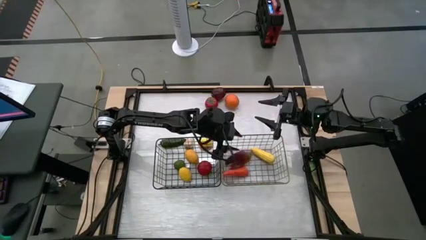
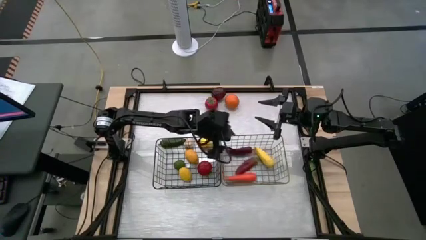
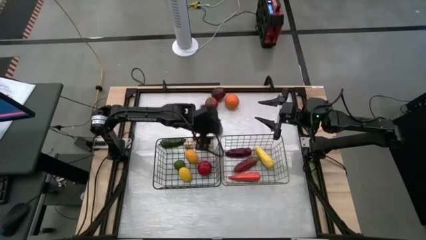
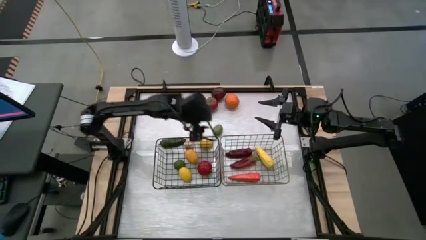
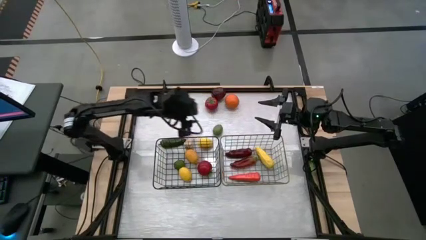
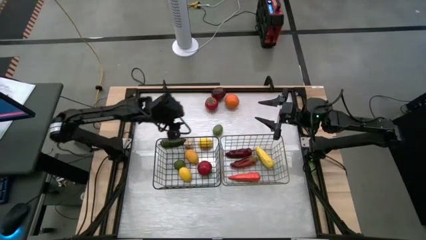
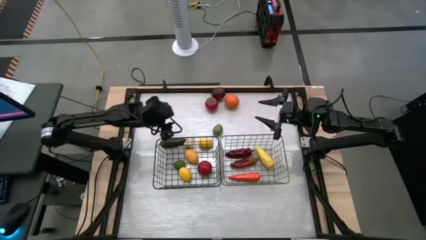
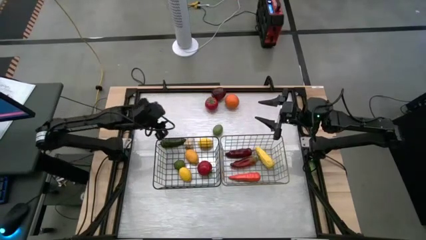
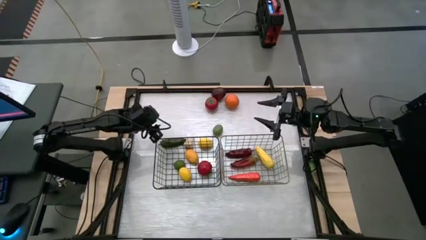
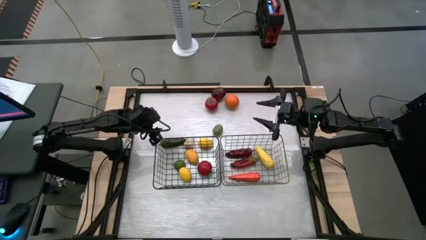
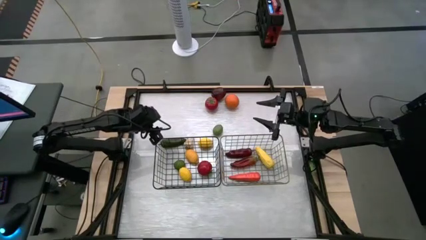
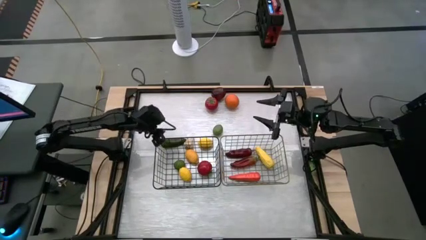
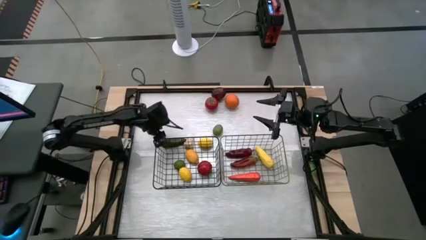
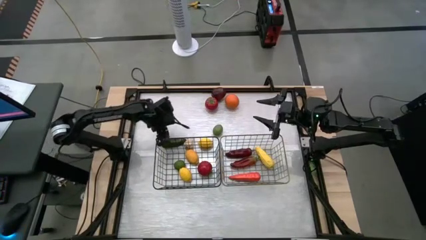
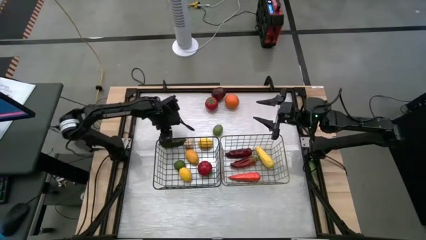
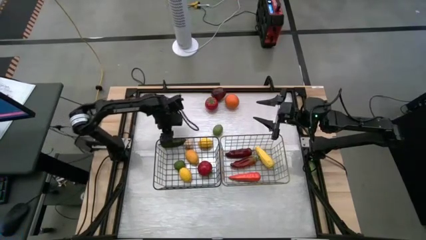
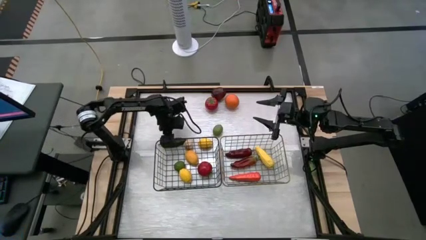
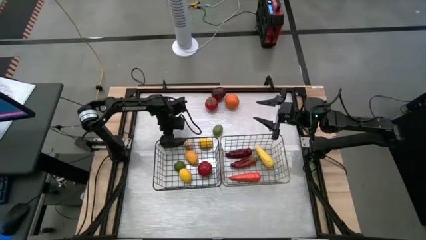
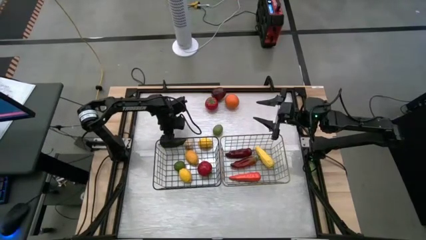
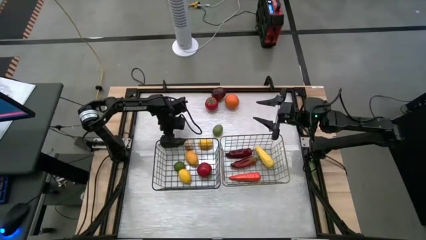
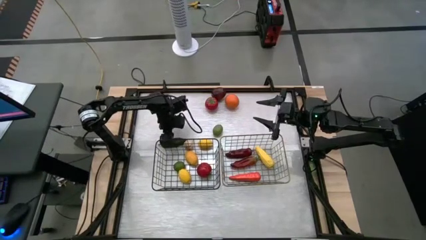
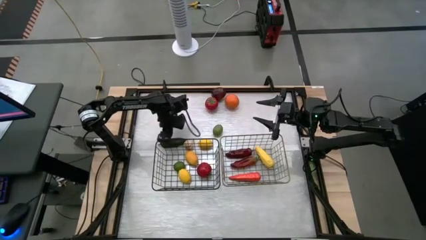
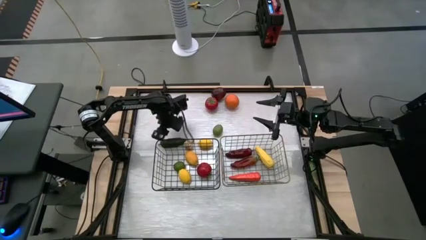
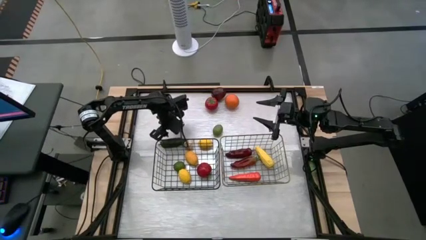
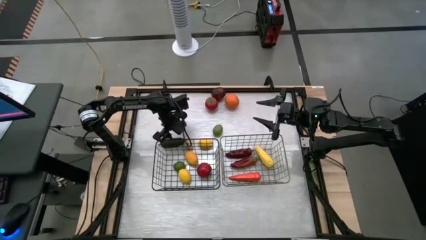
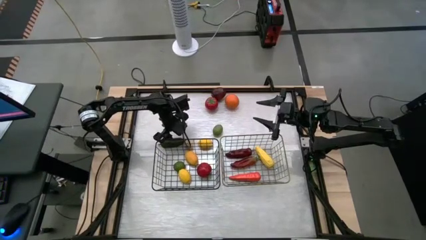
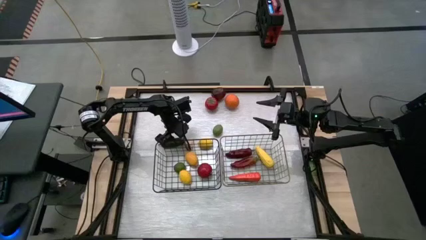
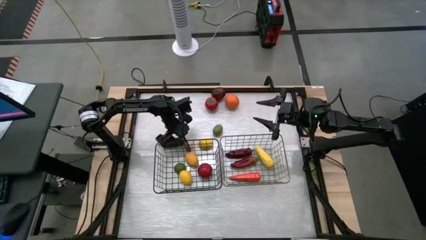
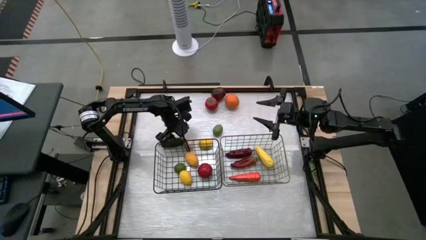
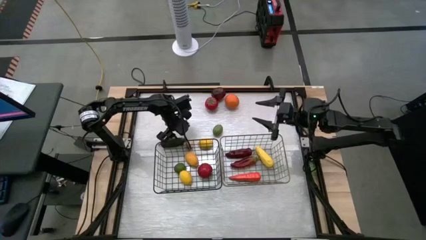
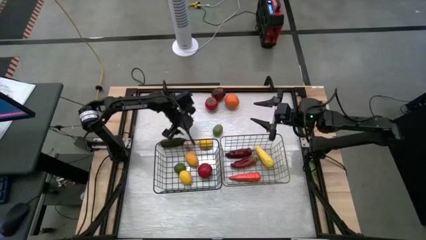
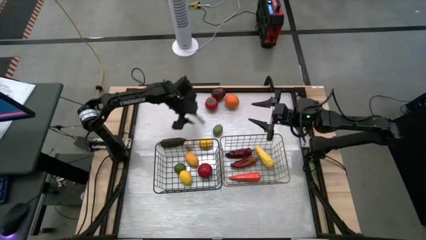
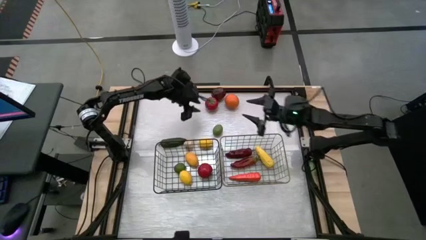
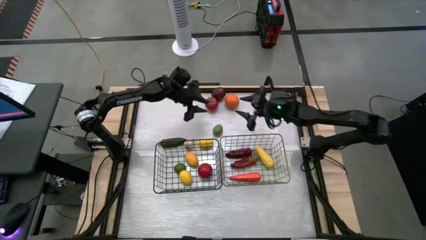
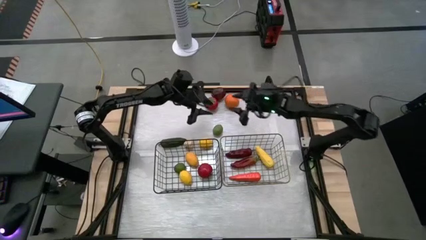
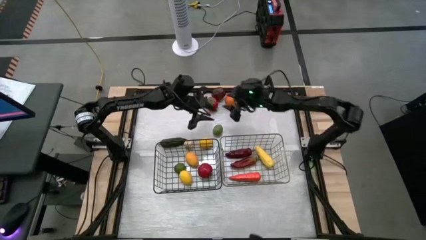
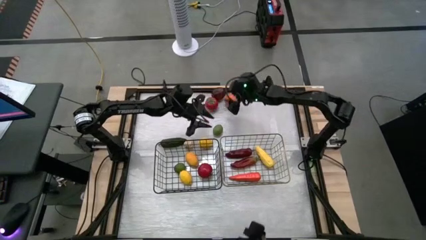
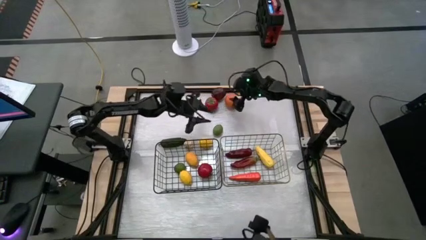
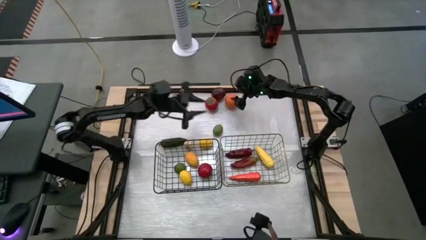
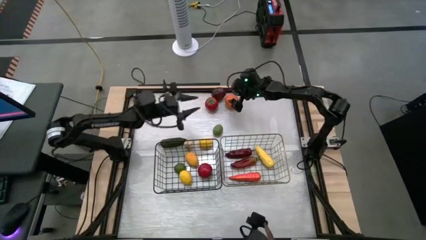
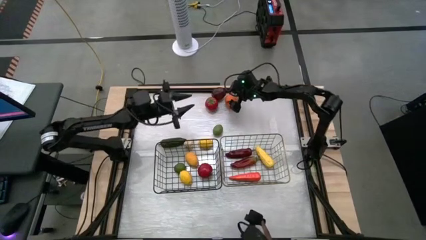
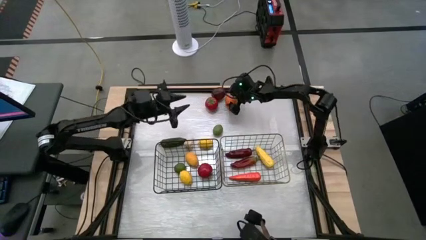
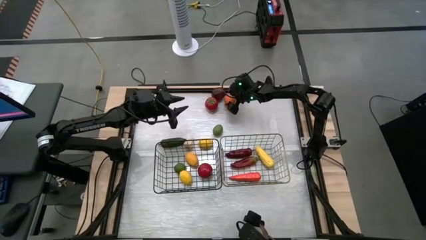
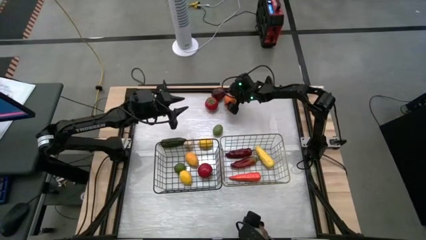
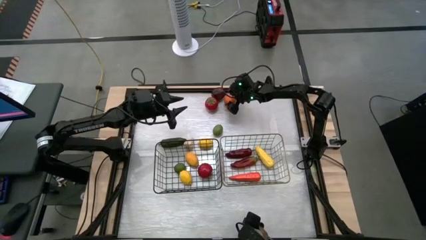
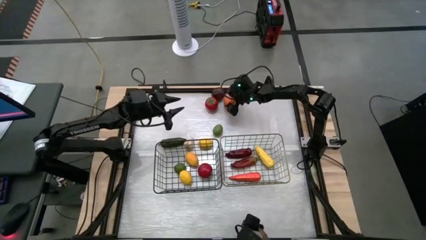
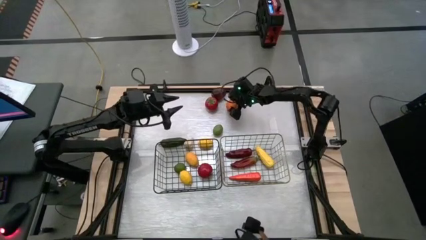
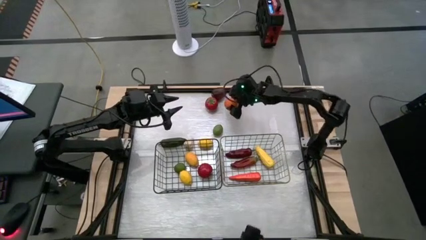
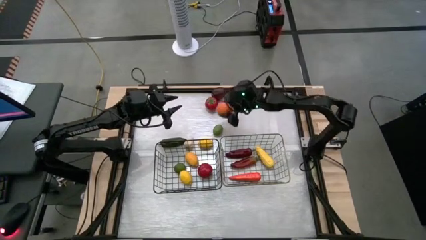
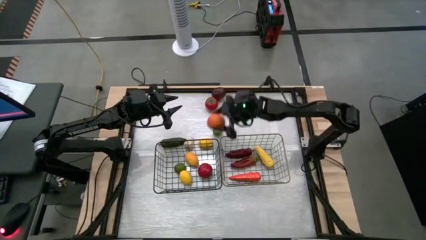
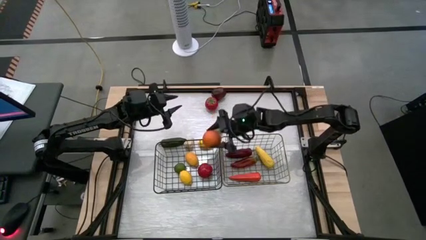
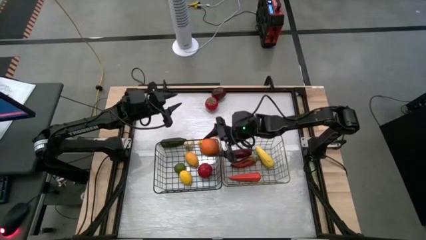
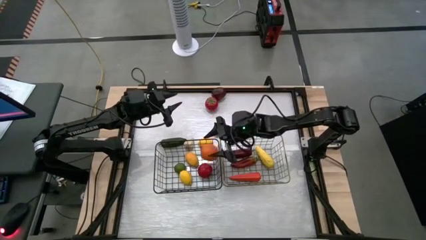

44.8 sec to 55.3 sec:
Task: Sort produce into baskets
Put the orange into the black wire basket

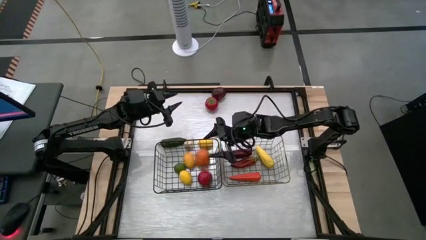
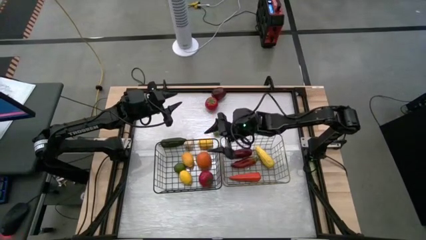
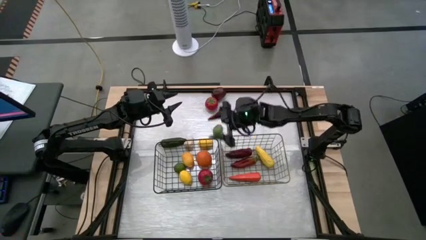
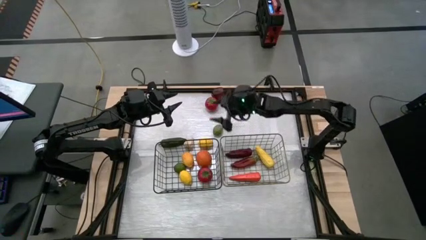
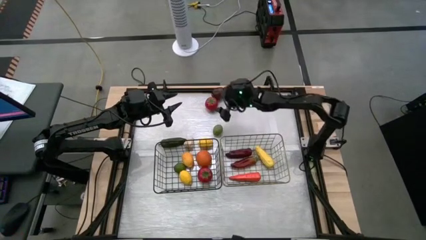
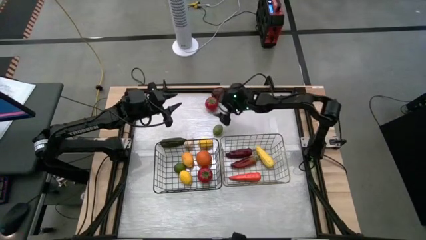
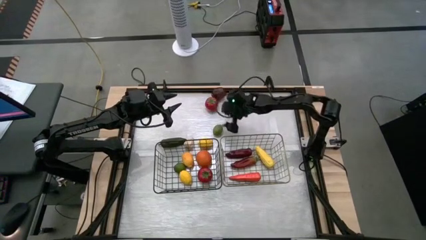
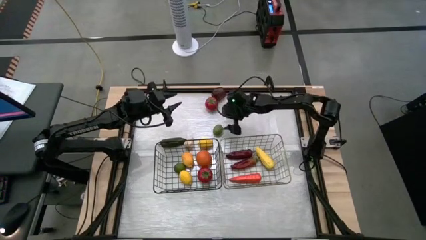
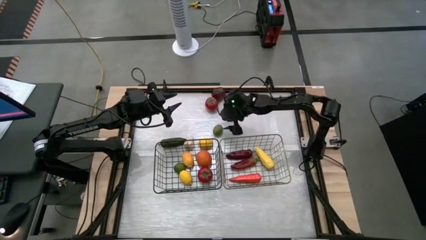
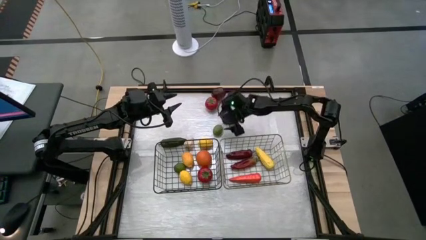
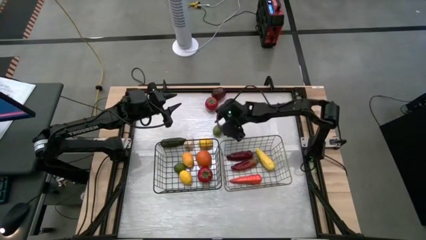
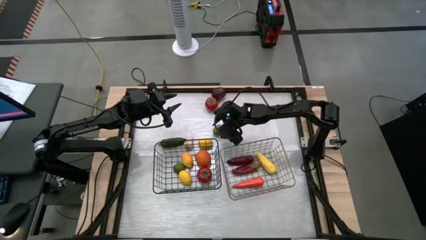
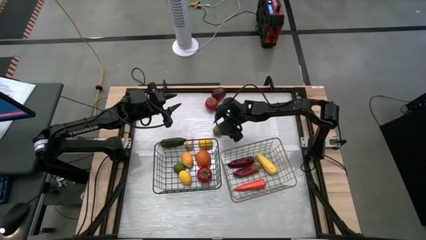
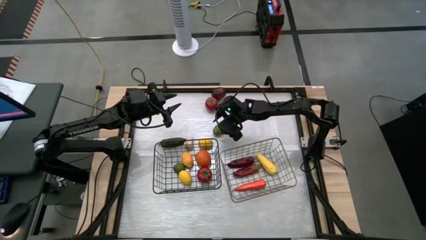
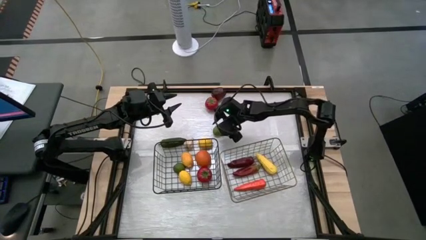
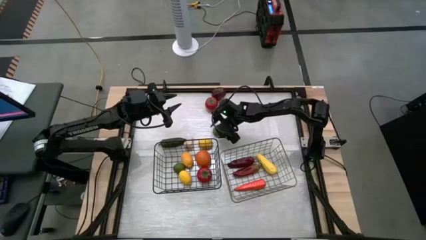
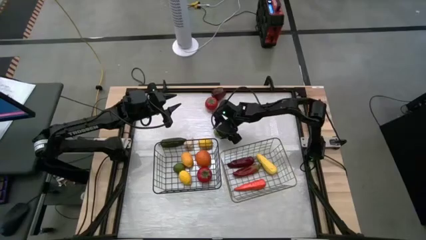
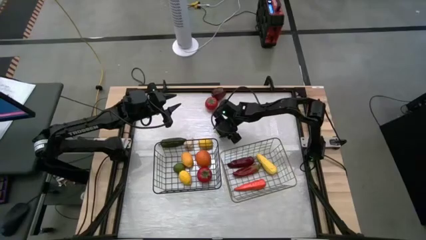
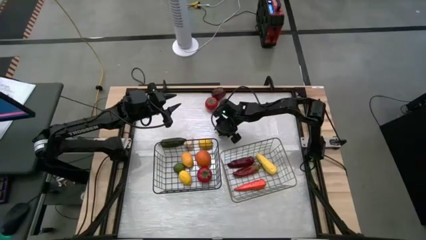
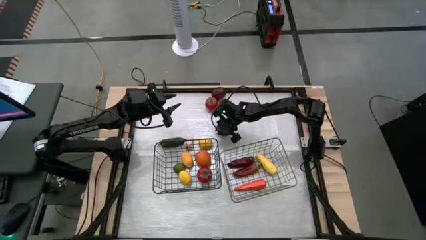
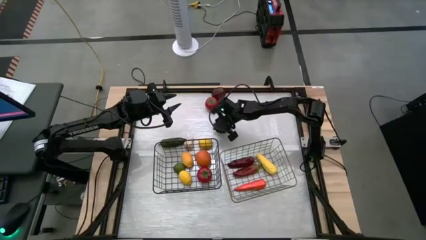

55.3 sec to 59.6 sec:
Put the green lime into the black wire basket

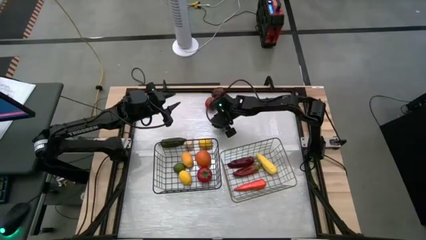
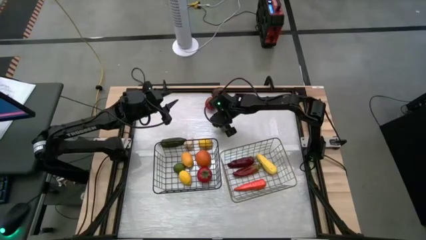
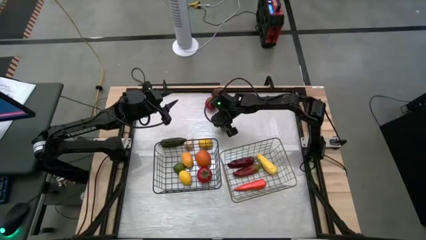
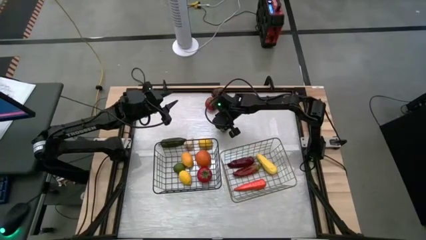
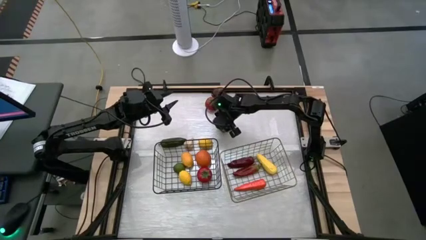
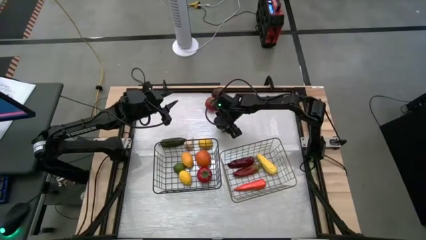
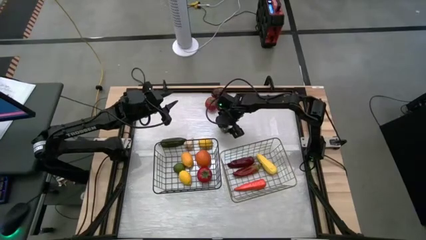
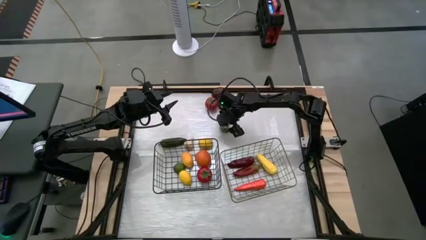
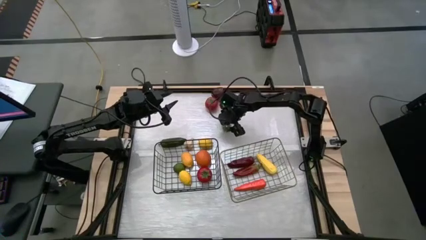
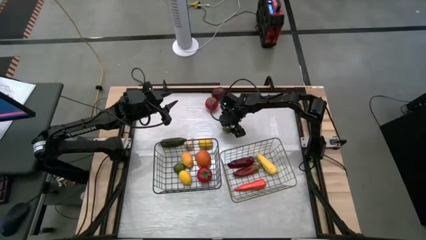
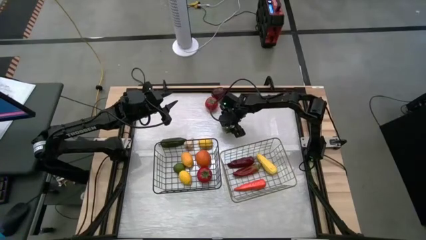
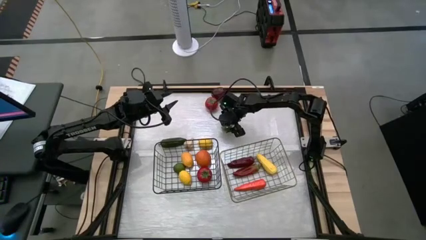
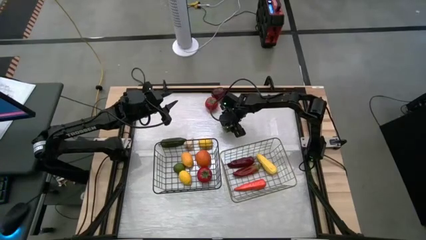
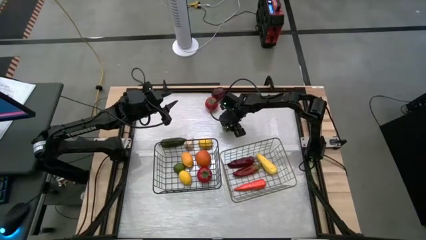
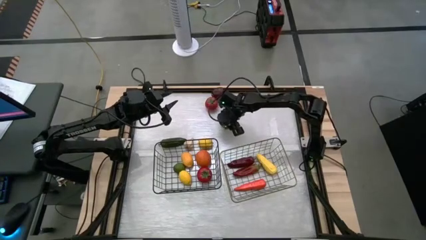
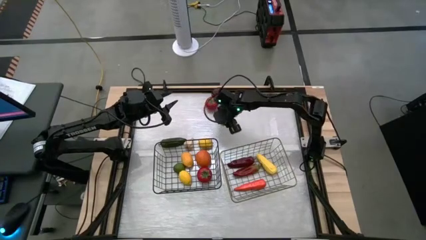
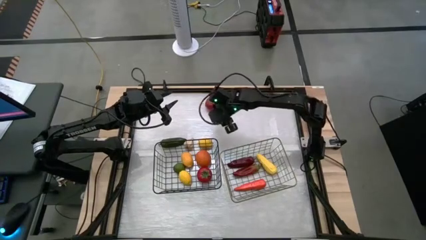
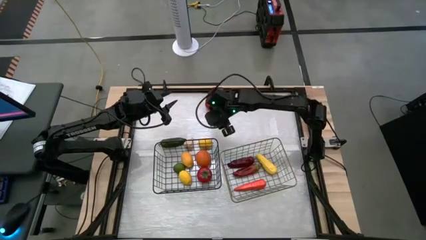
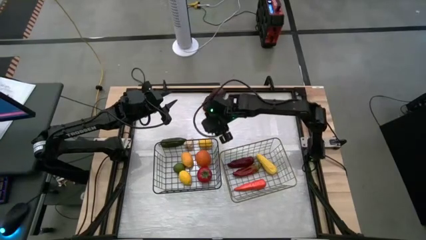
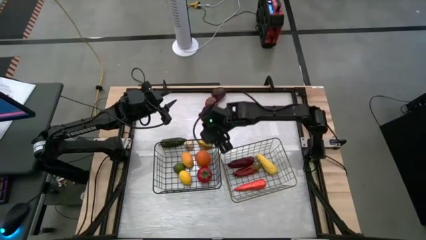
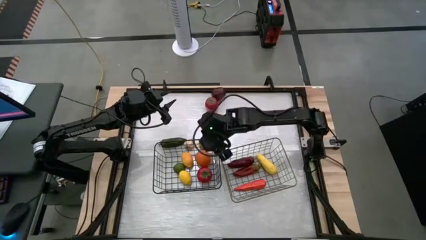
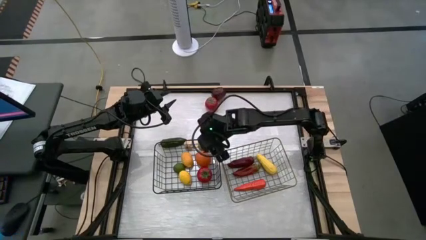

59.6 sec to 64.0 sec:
Put the green lime into the black wire basket
